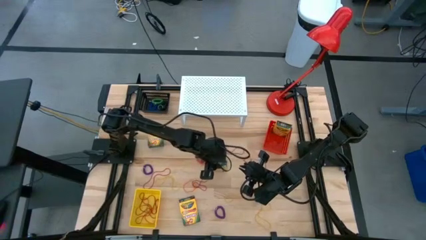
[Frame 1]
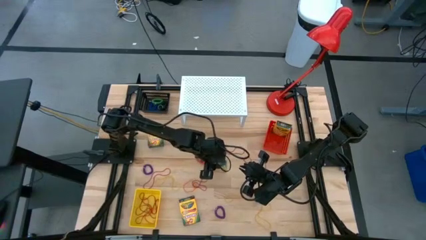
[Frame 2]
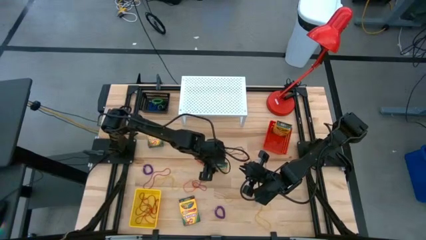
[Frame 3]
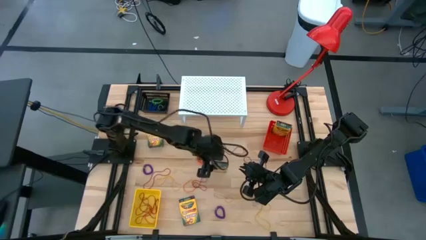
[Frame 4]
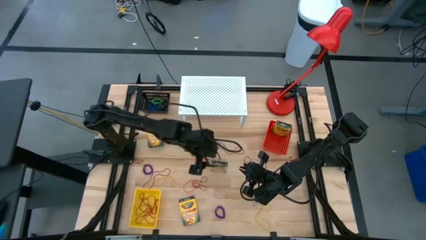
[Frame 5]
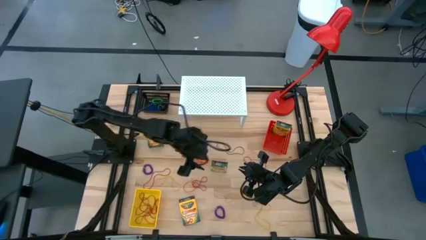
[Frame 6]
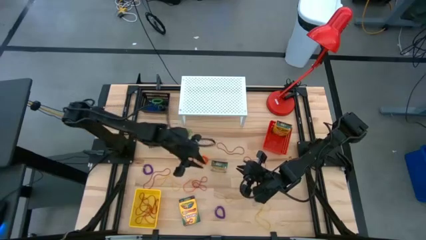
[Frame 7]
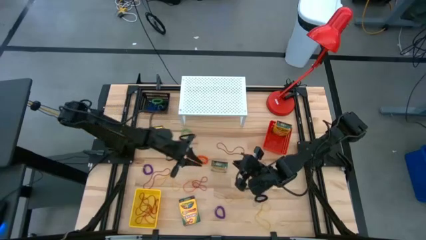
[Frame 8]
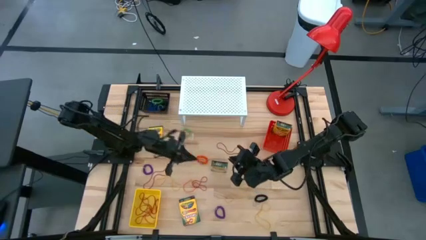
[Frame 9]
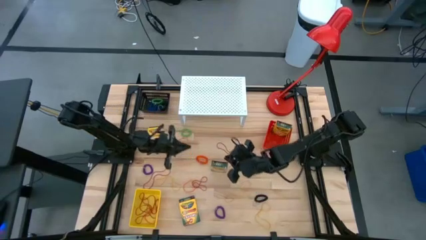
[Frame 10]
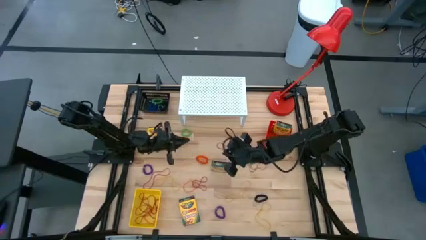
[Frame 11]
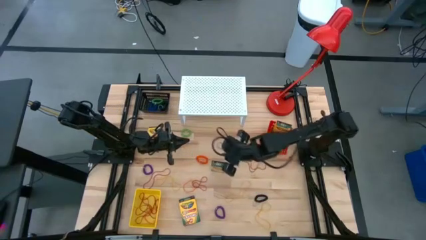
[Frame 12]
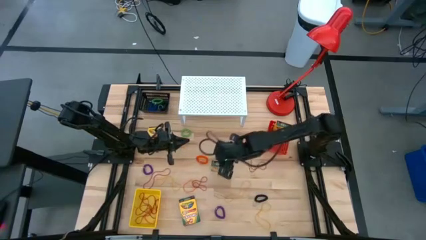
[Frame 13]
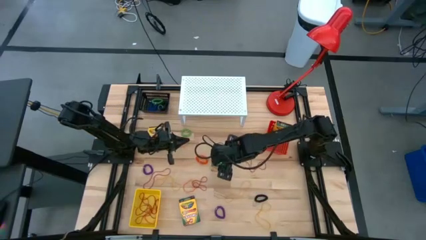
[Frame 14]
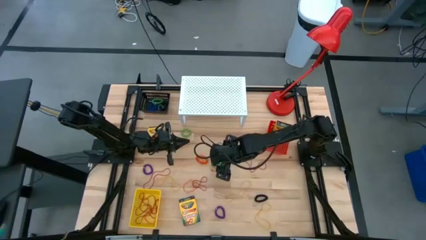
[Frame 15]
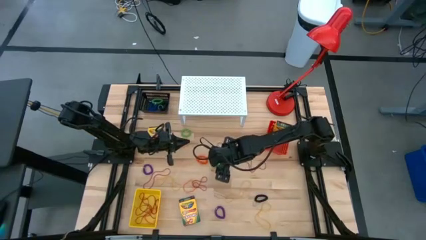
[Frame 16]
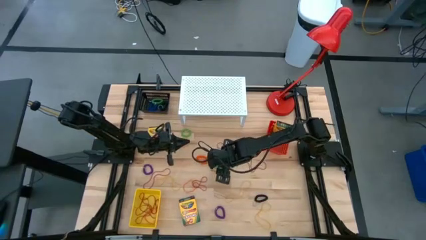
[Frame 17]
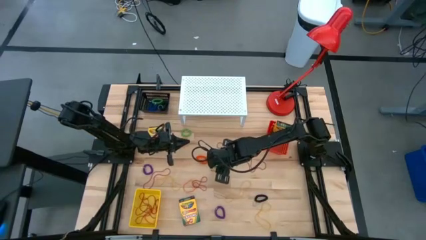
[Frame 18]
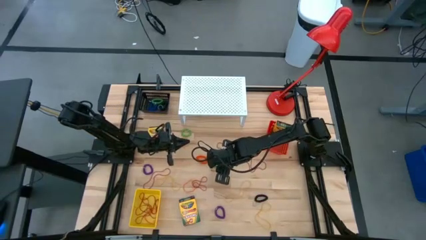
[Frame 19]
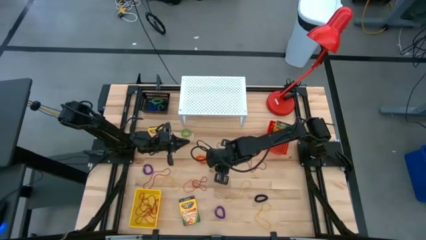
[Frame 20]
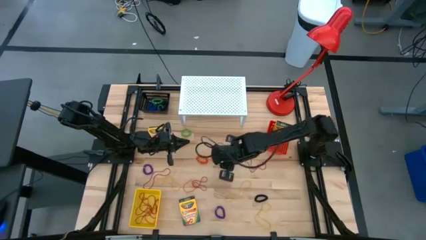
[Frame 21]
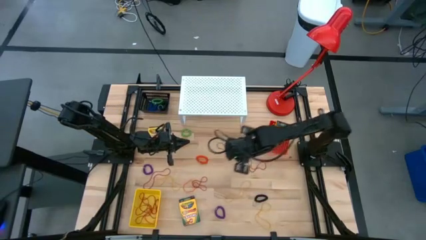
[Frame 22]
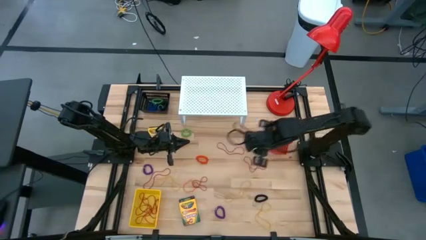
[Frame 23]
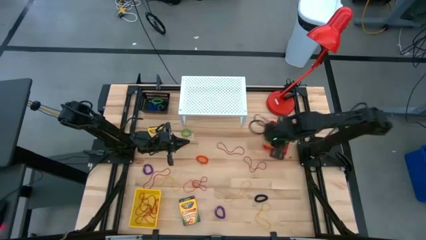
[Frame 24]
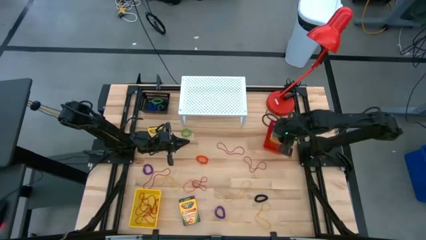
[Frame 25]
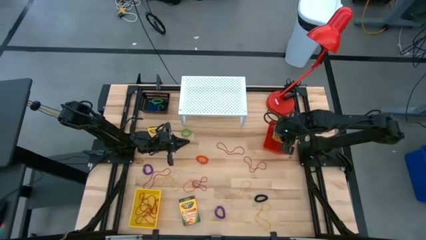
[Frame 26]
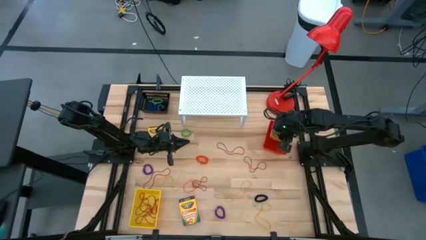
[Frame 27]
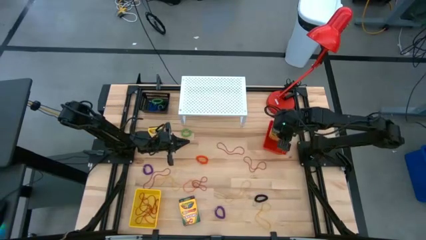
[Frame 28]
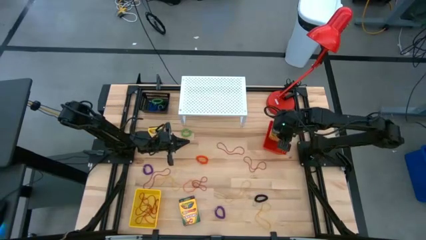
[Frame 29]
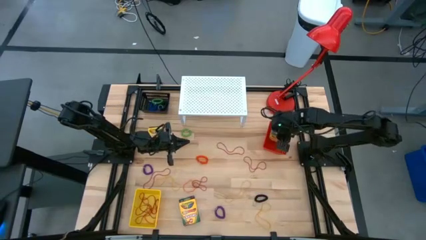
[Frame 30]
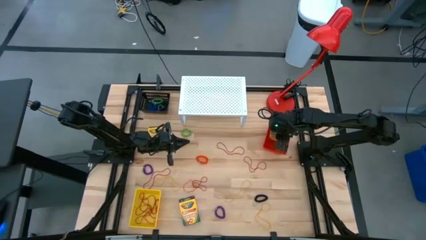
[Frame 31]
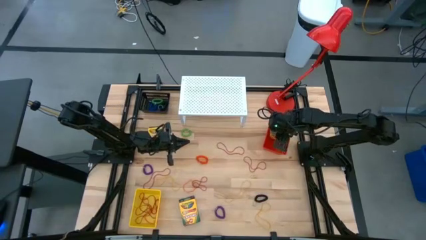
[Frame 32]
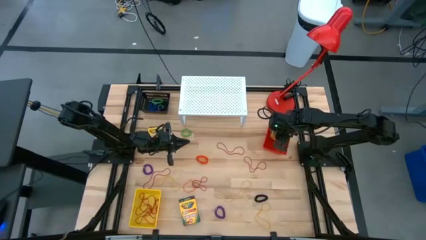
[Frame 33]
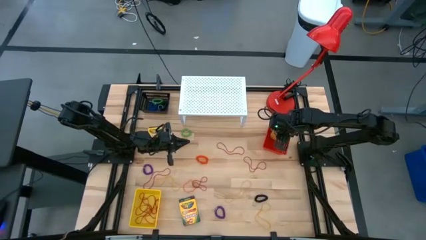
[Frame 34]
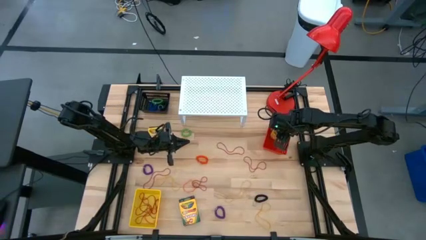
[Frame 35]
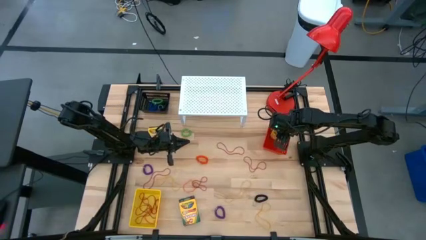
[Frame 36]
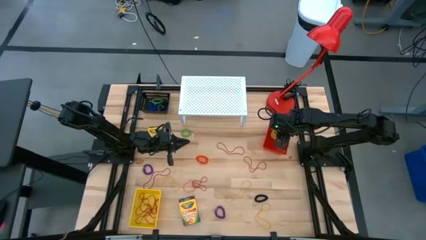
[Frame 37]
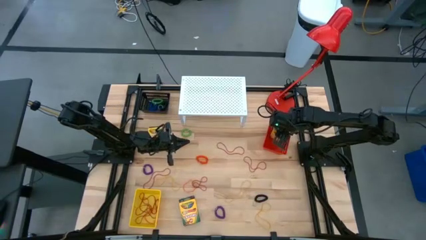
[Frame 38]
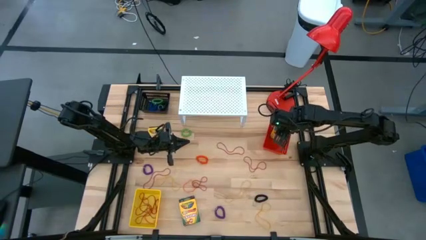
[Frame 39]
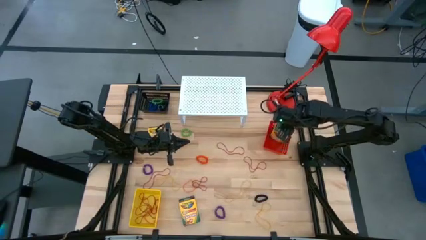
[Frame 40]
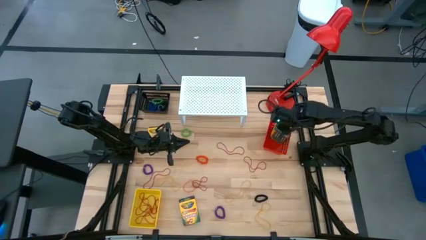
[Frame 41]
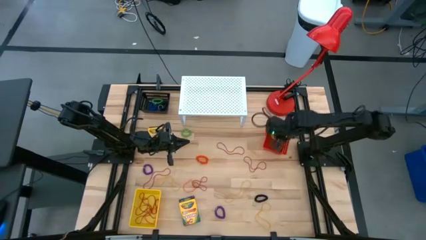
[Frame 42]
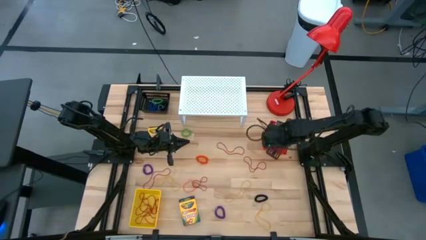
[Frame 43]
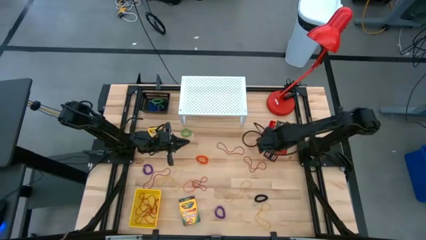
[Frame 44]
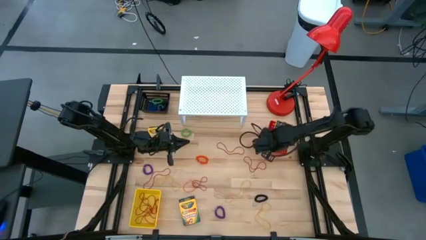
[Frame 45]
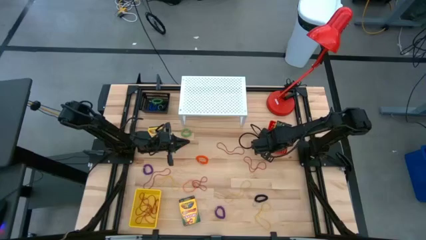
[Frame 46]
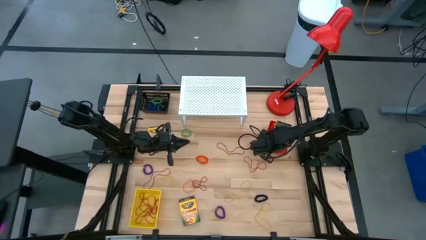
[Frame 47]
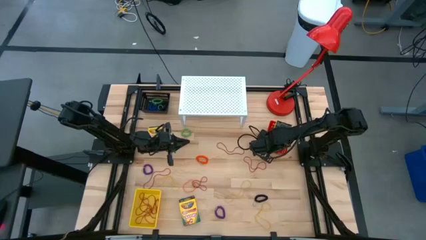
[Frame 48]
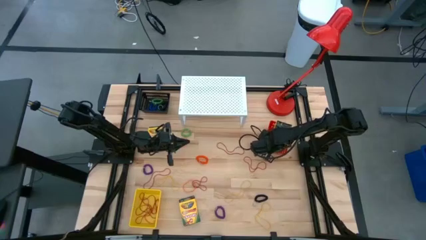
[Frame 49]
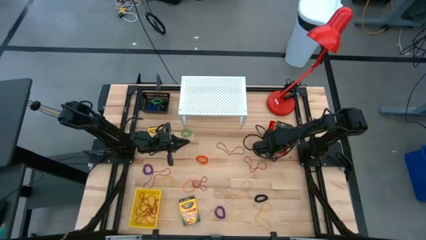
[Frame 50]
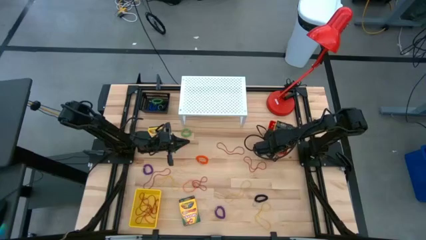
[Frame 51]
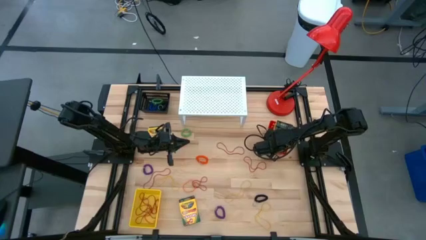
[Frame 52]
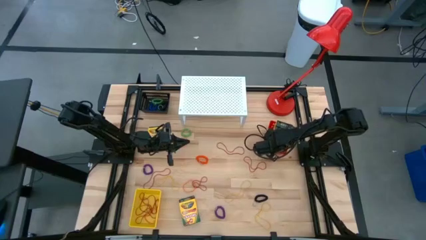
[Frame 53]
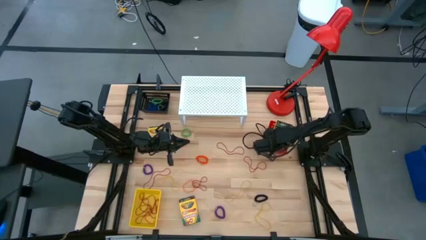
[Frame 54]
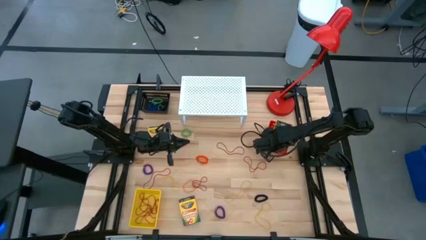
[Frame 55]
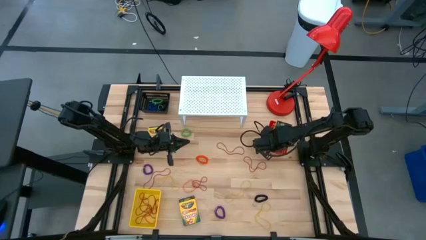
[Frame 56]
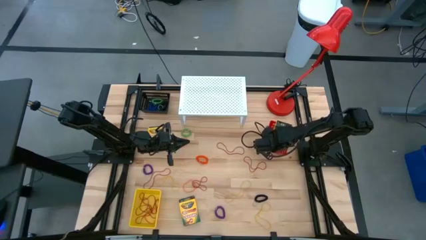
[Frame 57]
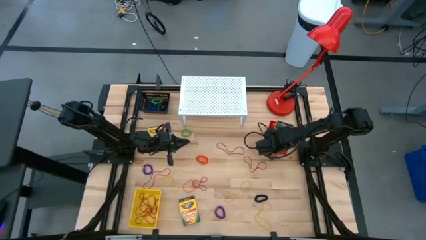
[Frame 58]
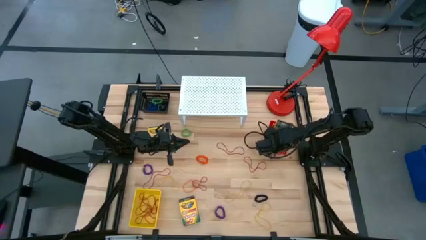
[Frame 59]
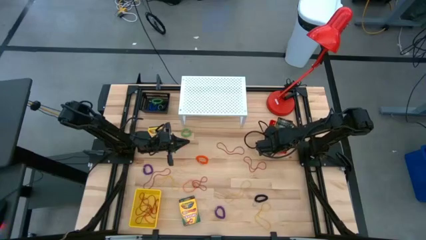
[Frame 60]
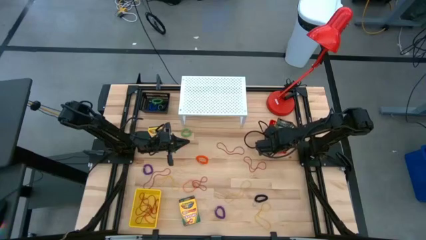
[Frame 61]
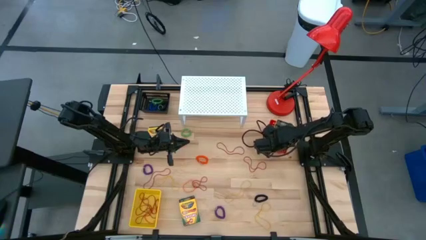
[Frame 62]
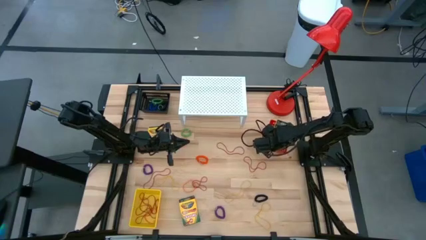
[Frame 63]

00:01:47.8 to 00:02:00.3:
Task: Pick & Place Office Desk Supplies
Put the box yellow crayon into the red bin

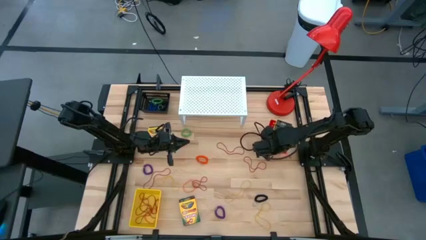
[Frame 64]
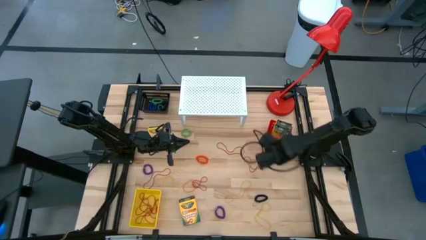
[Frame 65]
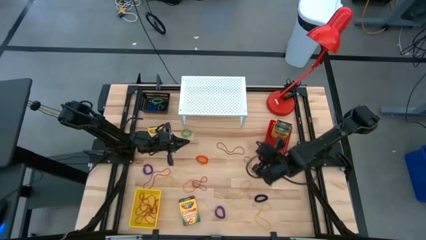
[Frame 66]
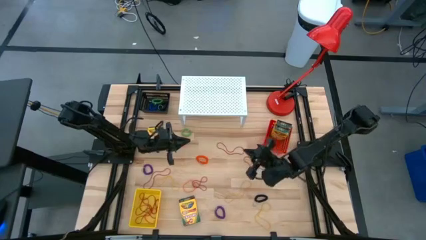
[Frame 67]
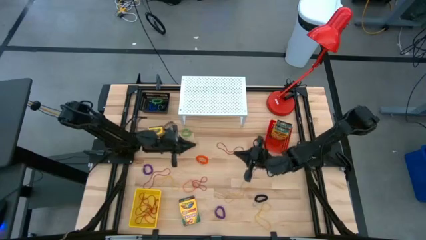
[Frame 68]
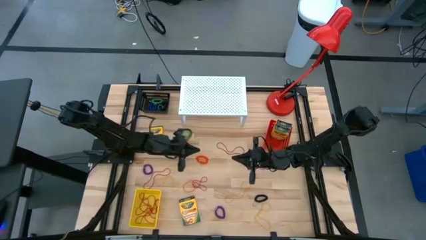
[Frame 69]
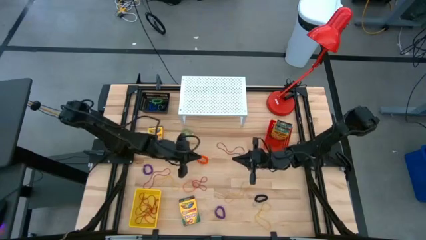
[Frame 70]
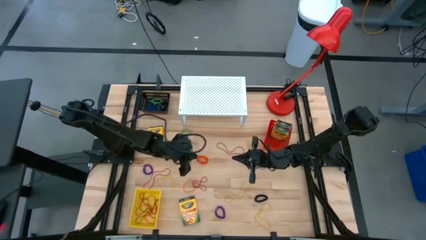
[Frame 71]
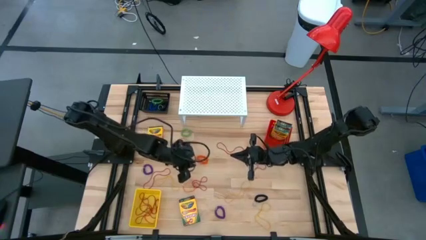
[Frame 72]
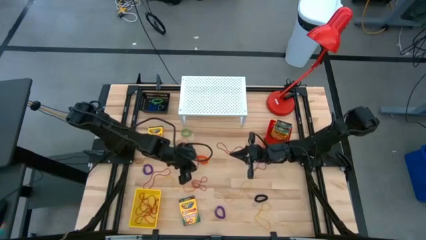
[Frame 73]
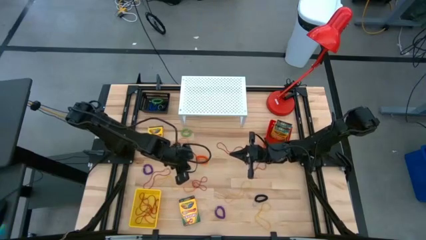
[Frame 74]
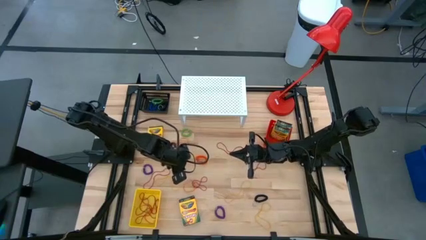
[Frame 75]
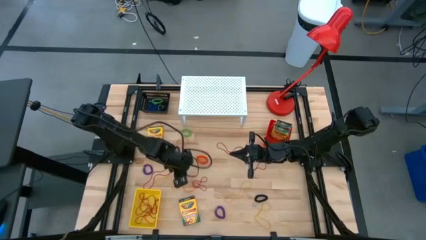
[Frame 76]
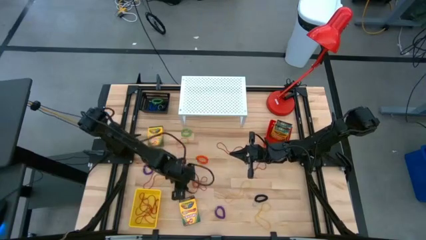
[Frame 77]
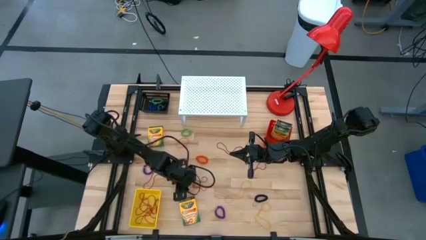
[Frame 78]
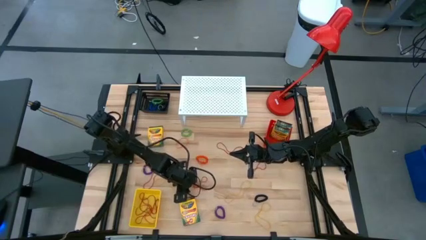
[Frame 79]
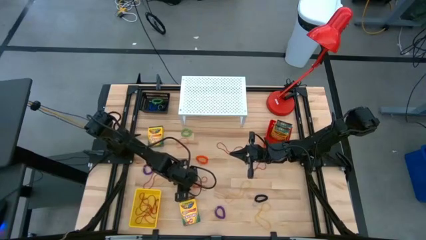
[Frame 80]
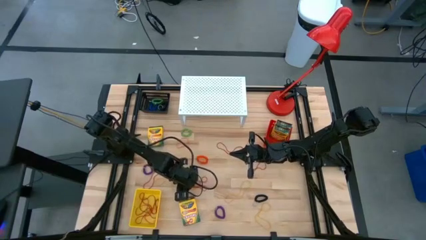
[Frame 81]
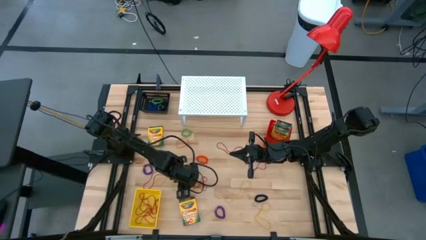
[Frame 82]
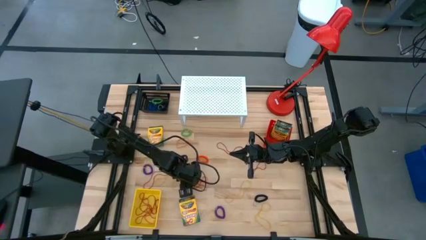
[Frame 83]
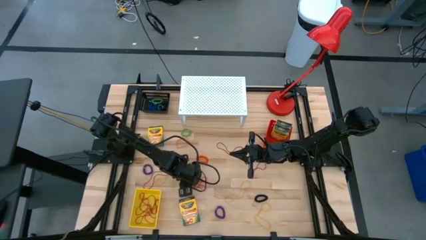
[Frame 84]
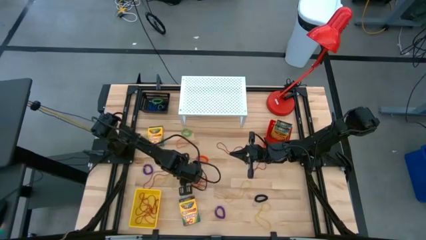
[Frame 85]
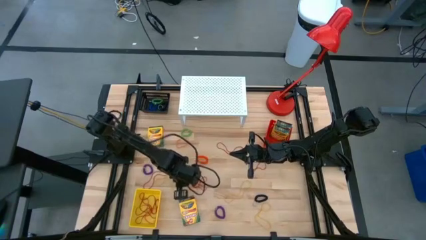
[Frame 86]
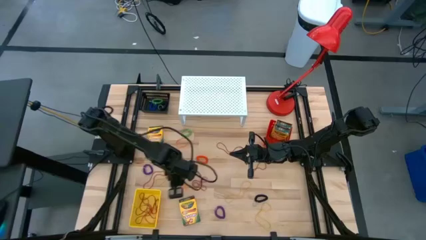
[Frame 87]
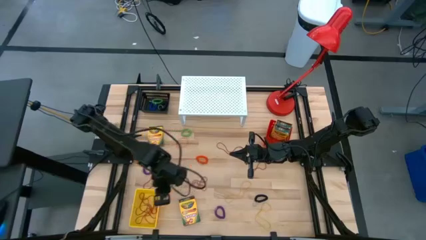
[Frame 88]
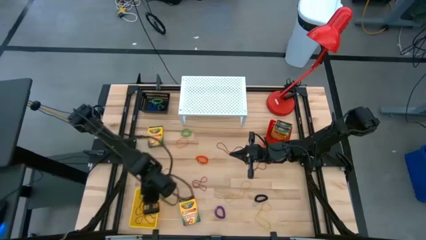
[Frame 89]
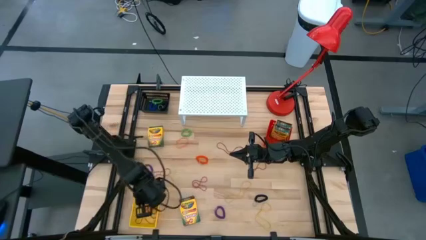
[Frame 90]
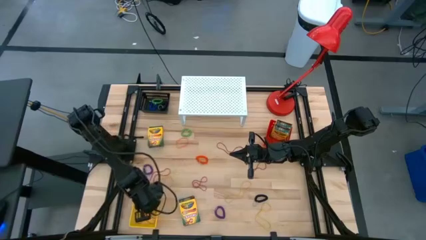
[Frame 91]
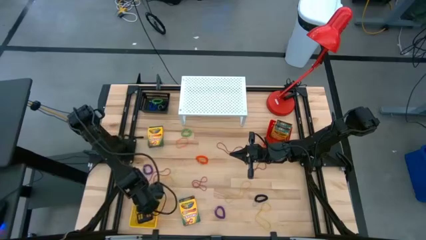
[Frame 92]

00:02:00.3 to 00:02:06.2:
Put the orange rubber band into the yellow bin
